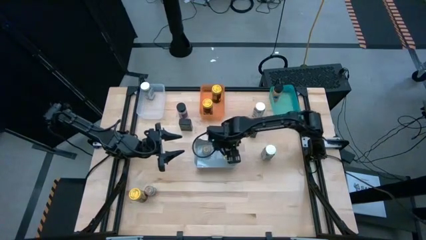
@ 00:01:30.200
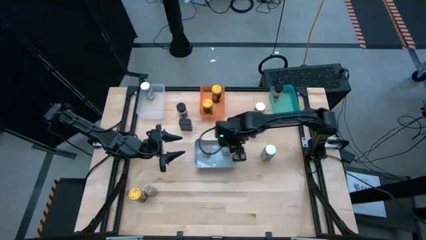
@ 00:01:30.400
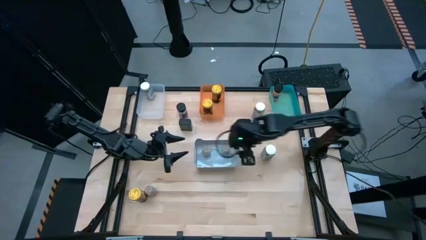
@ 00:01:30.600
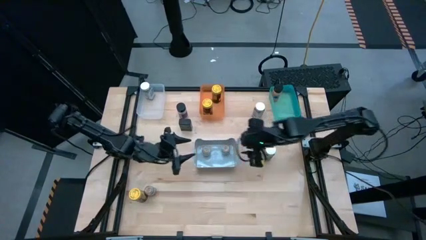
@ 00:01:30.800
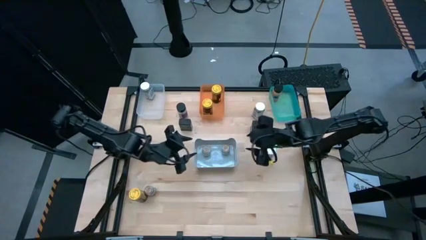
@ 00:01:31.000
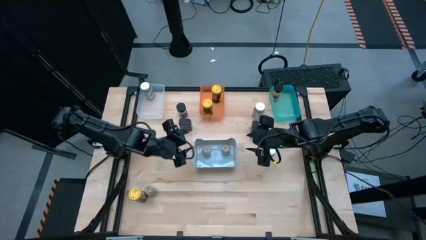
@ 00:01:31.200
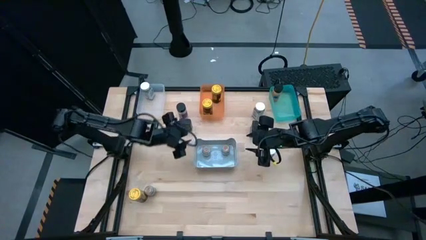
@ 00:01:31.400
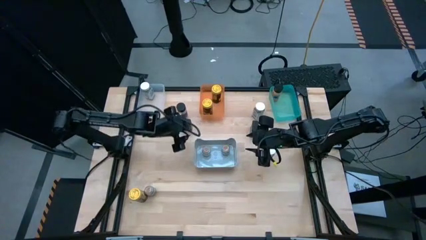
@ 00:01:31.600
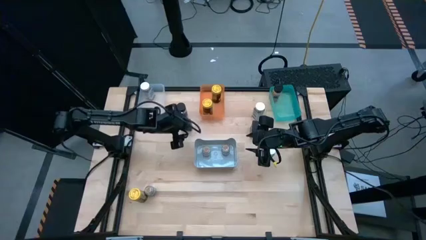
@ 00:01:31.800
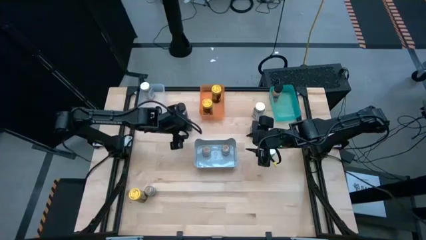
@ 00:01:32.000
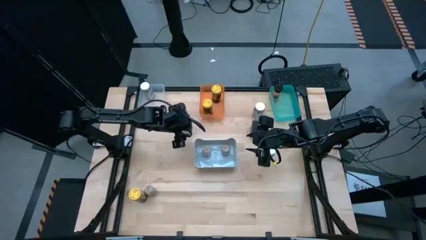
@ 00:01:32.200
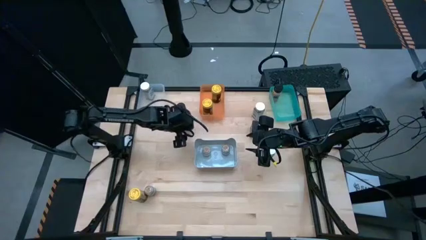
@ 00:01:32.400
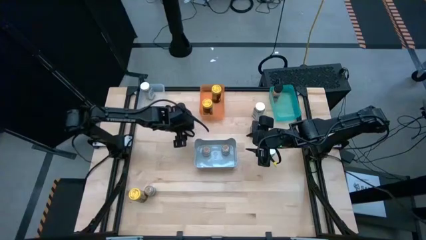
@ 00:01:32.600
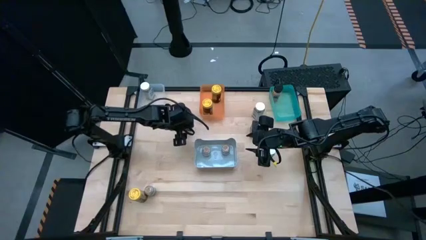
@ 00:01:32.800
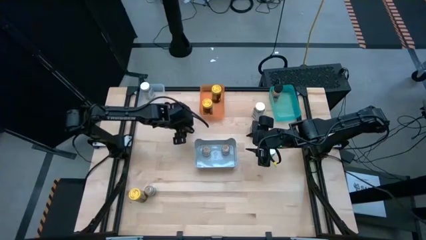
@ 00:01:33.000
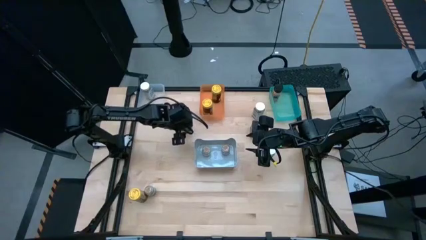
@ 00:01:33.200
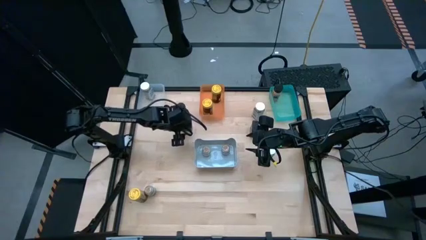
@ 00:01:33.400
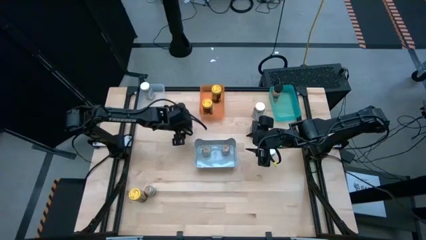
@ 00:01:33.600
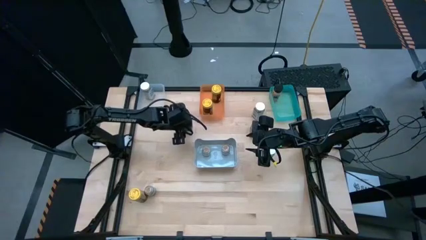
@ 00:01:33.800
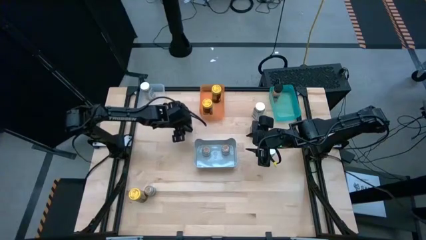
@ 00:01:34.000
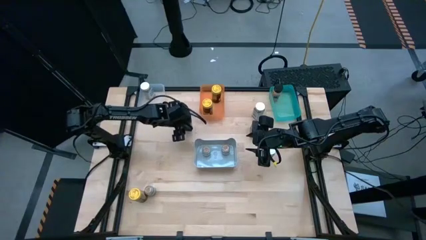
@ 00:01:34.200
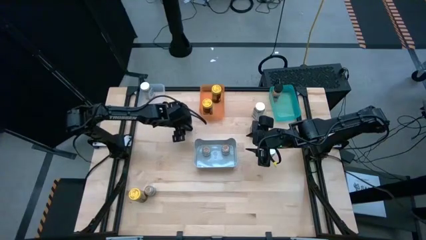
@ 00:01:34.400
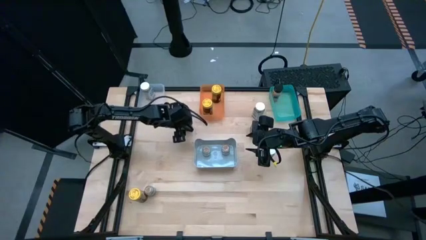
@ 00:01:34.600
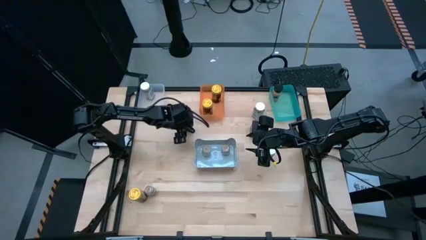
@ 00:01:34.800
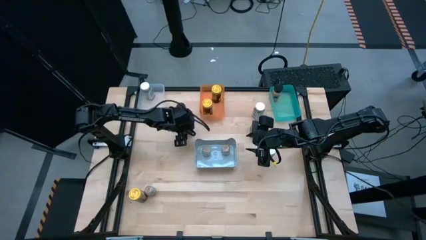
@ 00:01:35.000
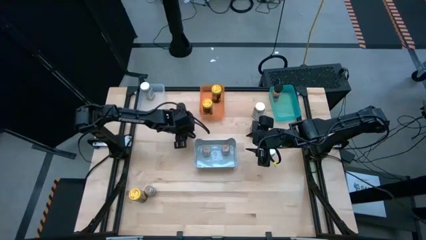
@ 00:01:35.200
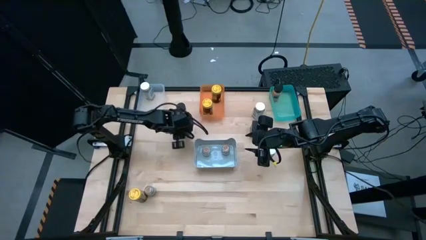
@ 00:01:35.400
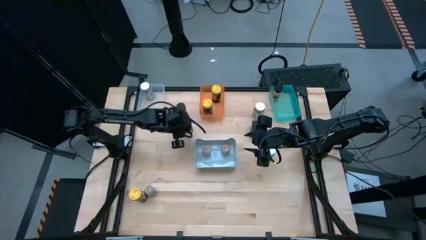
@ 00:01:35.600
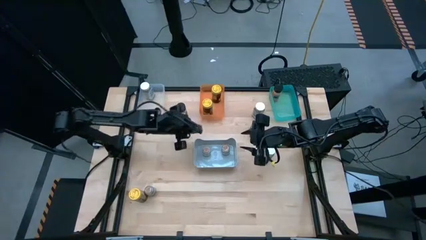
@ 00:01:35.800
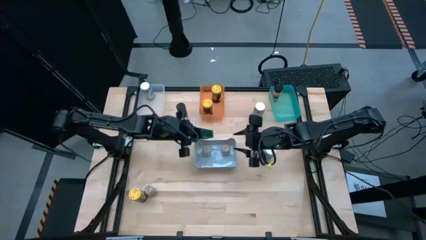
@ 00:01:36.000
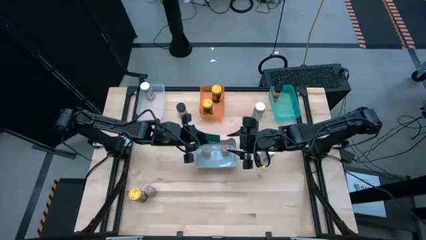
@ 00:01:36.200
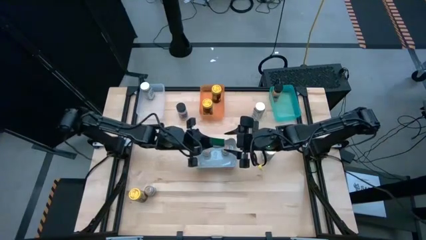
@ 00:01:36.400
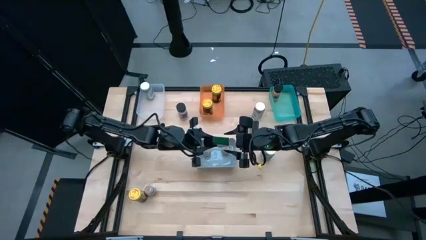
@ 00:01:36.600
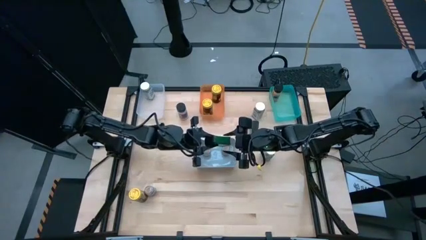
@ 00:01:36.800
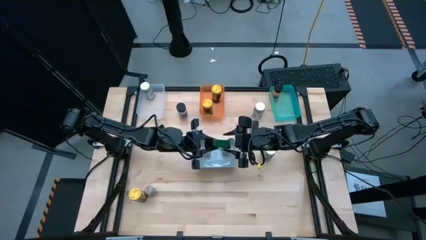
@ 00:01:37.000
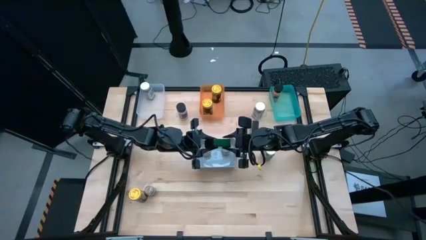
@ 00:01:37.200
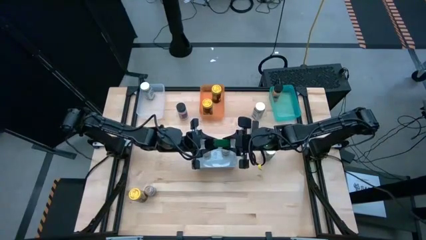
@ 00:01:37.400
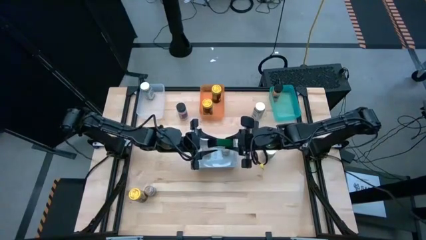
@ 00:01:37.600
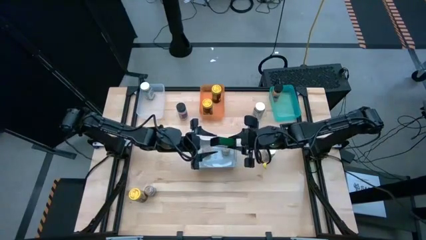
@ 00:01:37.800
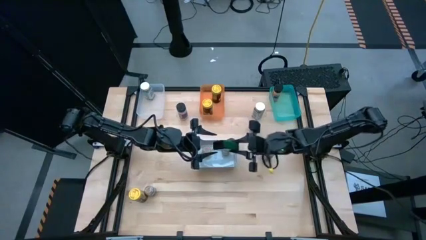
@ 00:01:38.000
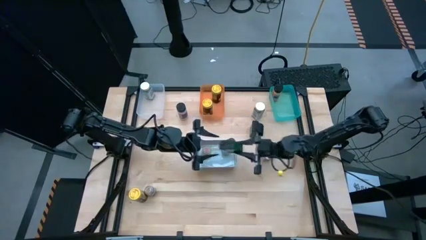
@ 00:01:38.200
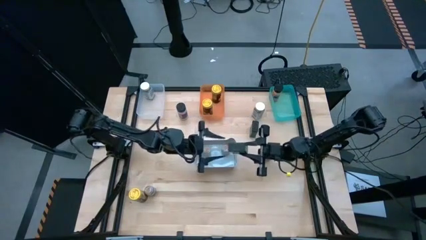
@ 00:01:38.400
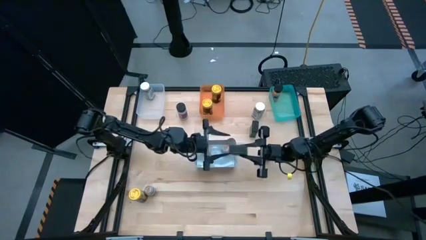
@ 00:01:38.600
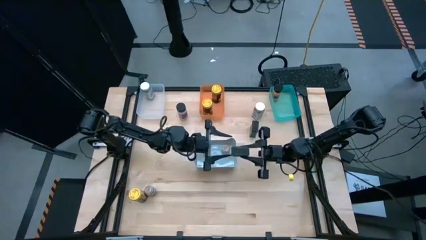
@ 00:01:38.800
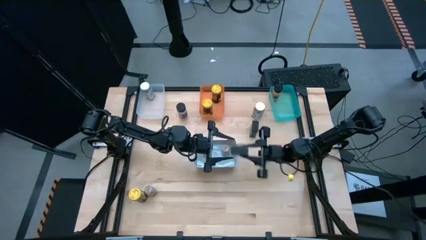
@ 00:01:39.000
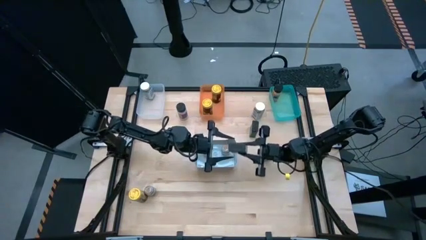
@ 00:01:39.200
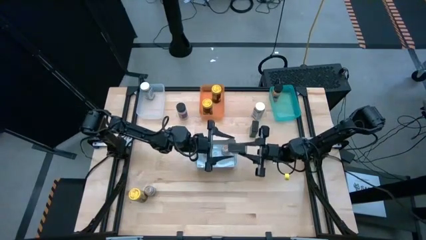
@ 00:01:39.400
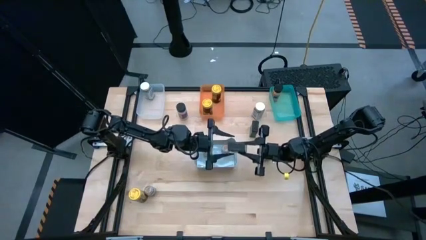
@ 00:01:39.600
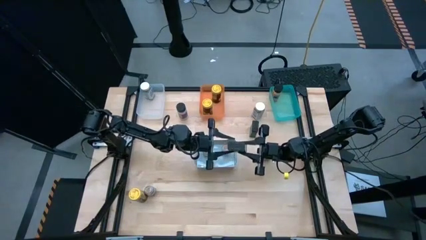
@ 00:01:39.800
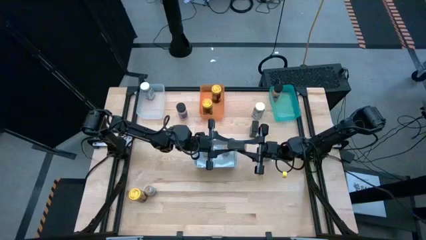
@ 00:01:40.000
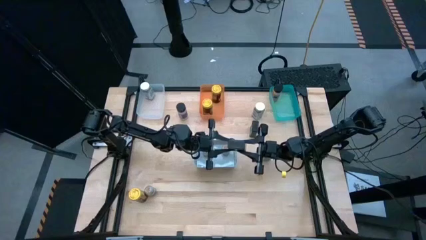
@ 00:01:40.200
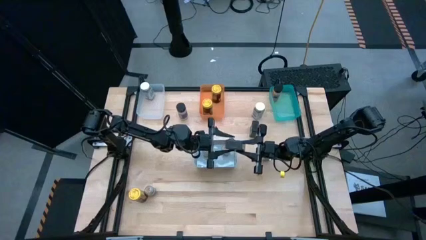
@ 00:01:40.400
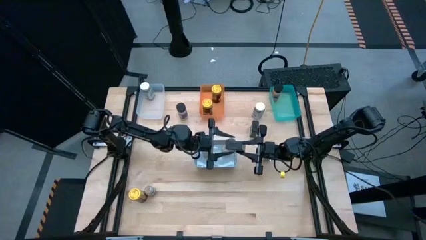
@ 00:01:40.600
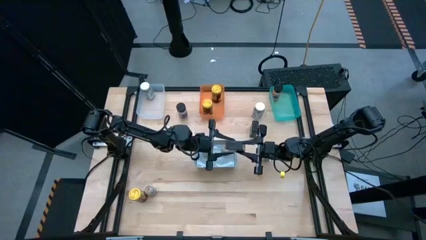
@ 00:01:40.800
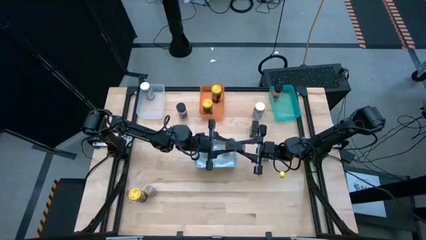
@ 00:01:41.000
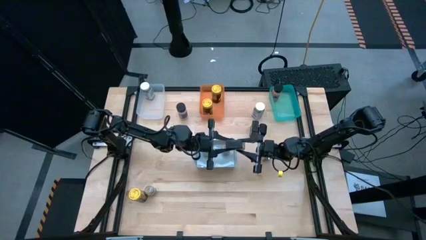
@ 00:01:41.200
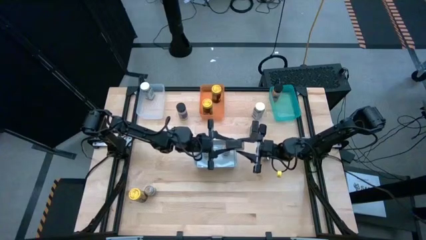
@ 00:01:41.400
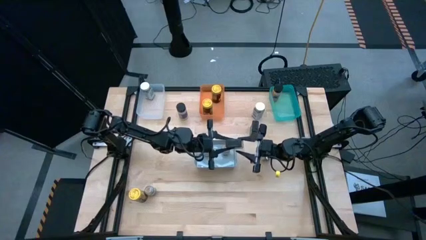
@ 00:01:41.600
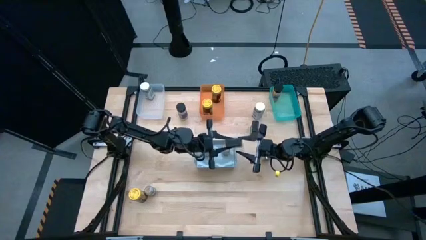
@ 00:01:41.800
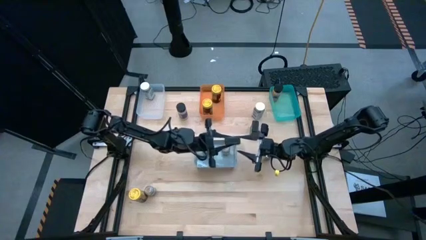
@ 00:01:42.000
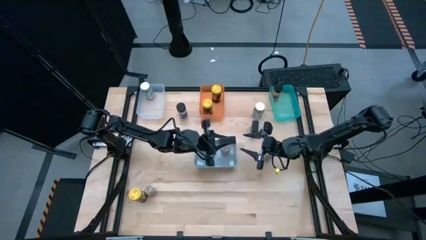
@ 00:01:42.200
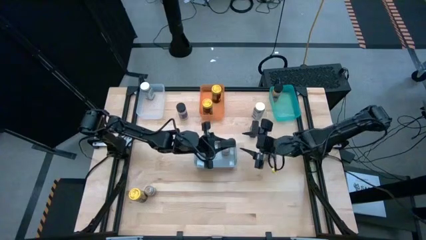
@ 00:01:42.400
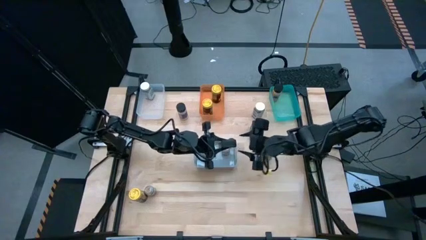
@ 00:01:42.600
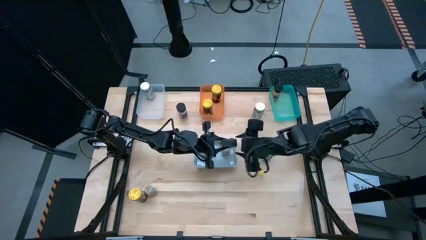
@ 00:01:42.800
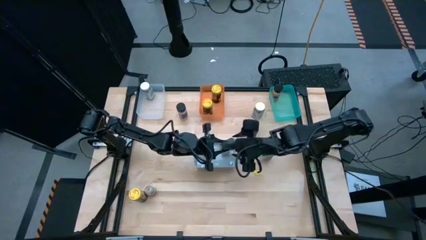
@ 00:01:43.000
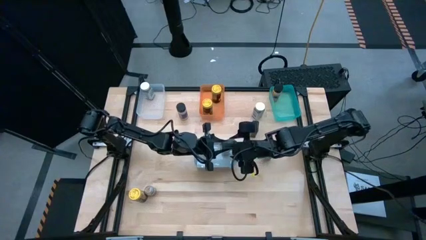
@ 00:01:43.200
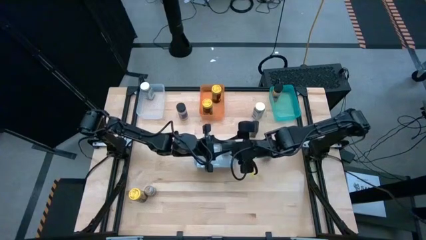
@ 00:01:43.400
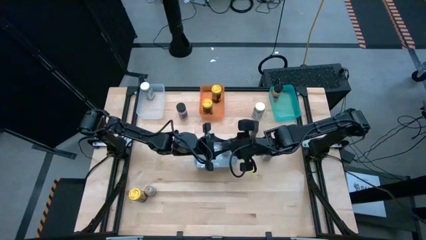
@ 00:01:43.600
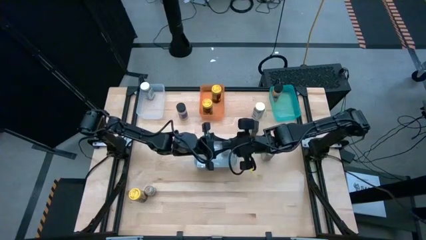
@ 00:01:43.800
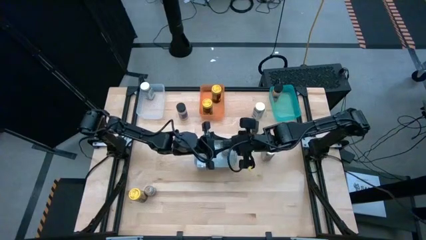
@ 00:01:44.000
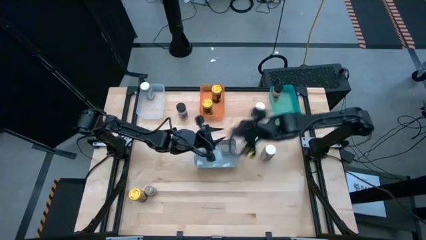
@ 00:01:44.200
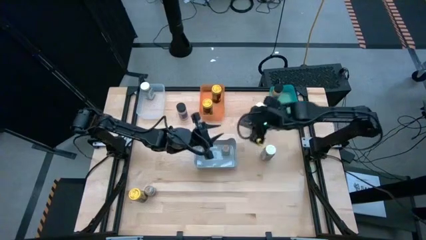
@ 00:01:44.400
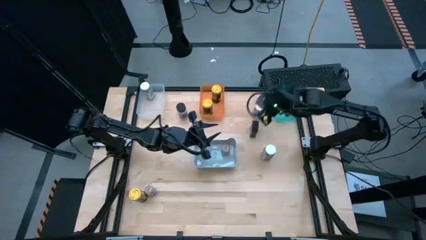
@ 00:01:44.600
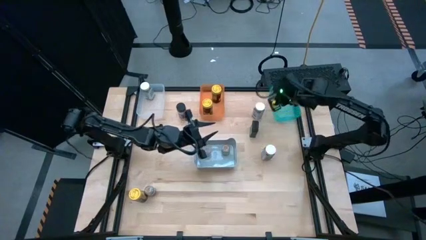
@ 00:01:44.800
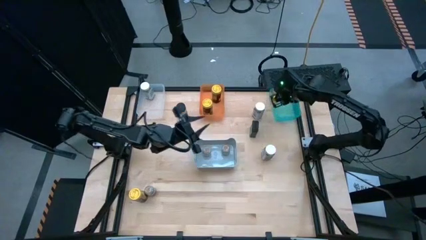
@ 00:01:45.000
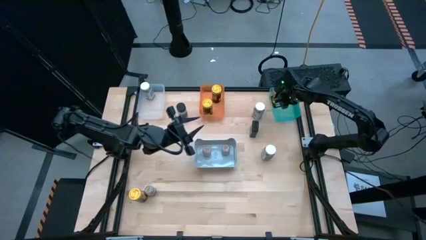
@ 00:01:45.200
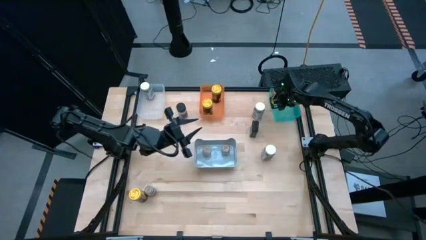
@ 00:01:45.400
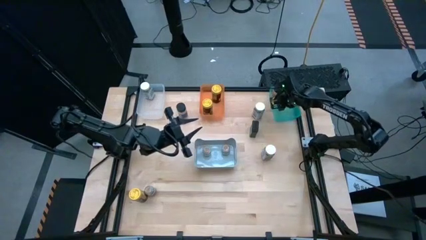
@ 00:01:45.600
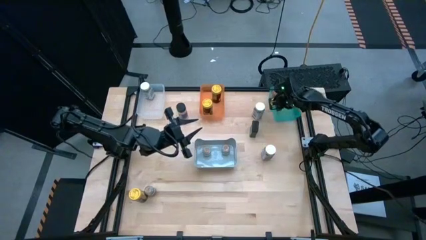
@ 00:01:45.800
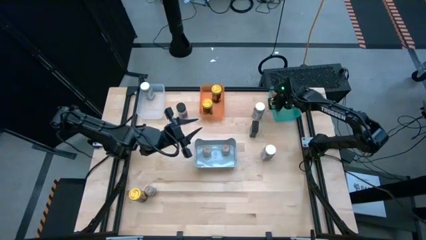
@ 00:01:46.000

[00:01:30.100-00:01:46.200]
Task: Sort spices by type
Put the left black seasoning can into the green bin
